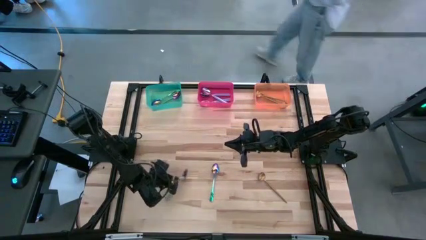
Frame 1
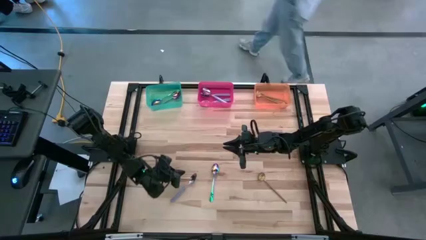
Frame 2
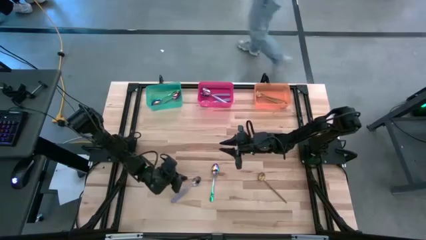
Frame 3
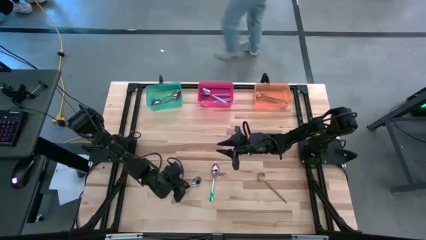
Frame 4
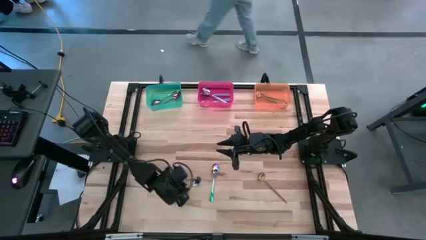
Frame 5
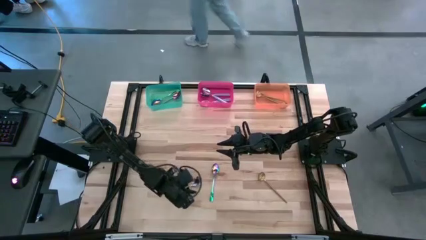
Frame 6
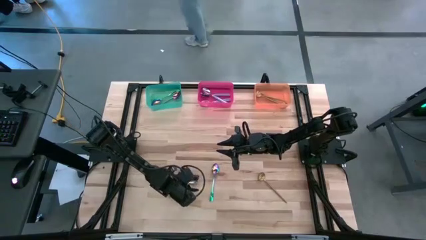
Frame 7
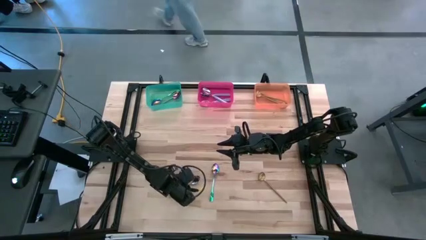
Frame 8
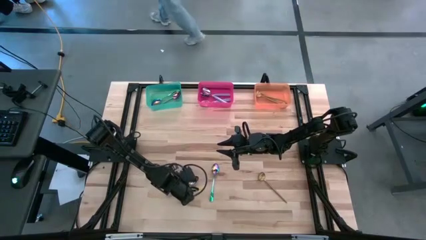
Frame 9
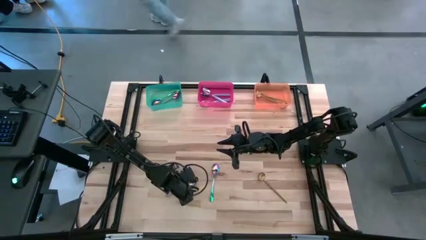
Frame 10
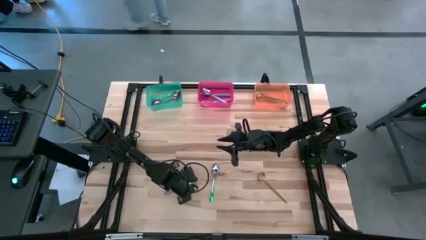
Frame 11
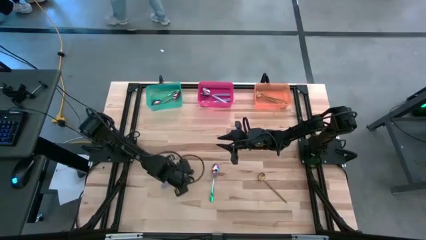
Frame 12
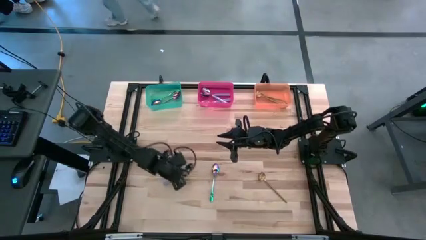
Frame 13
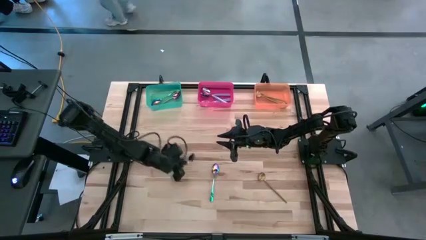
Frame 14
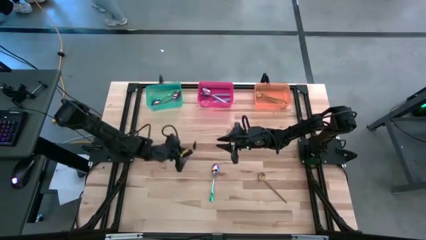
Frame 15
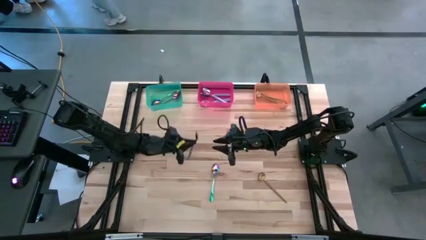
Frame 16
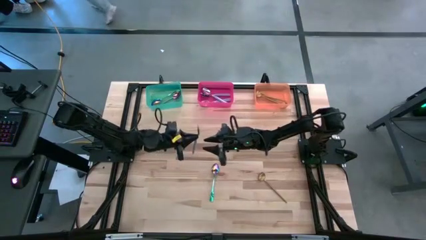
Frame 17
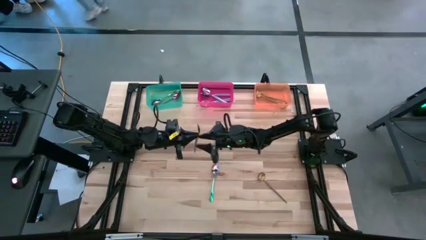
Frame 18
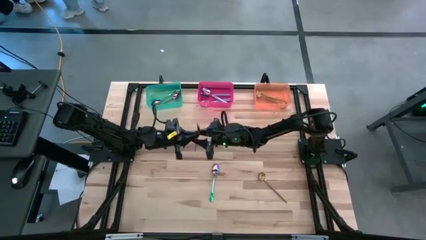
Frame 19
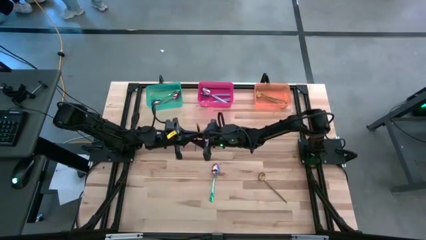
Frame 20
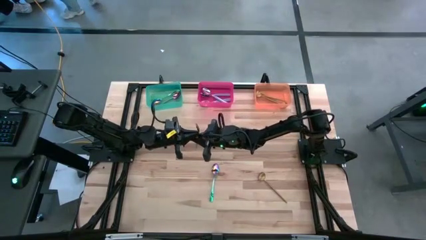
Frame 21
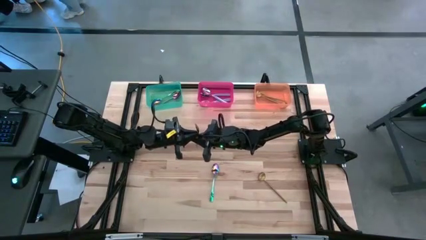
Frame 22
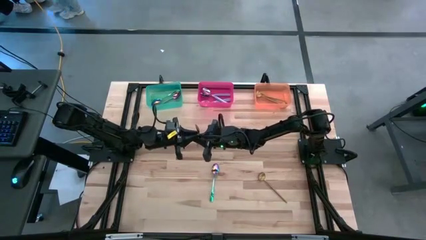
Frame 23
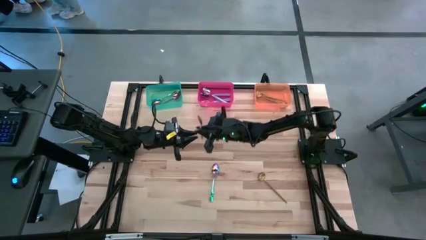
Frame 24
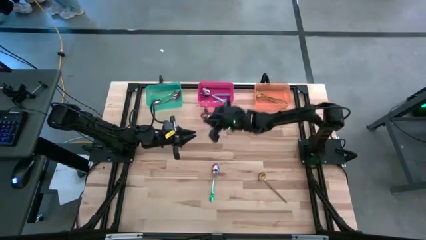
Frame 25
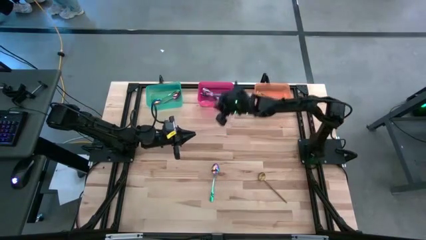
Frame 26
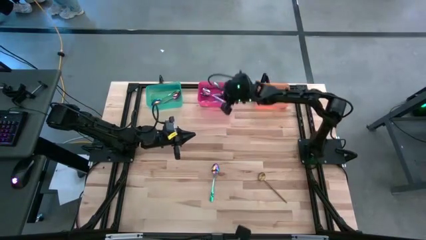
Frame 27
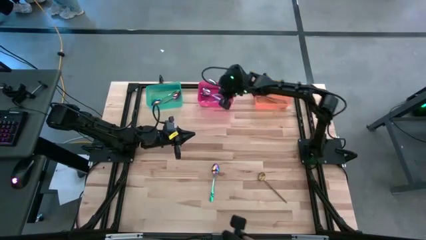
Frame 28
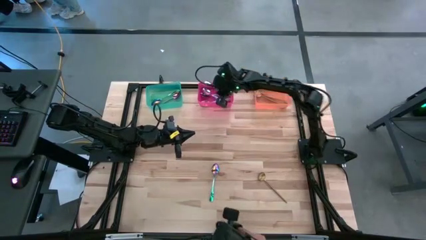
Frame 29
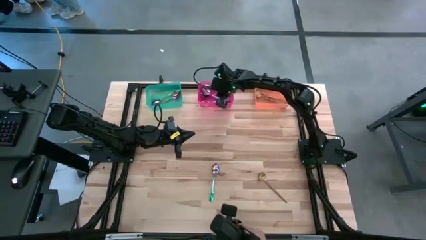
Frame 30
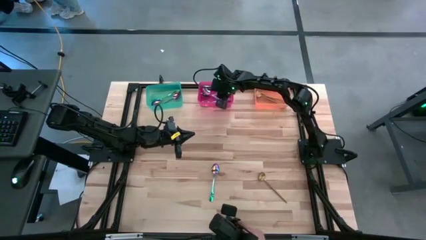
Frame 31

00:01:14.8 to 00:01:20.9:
Task: Sort silverware by color (type)
Put the purple spoon into the red bin

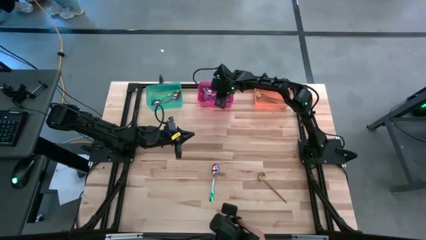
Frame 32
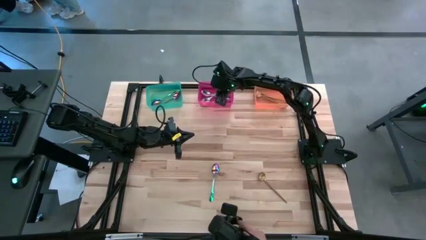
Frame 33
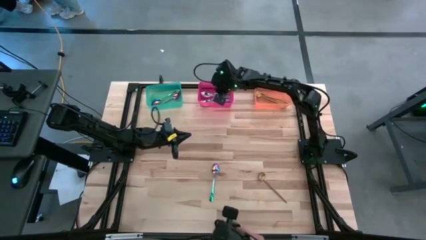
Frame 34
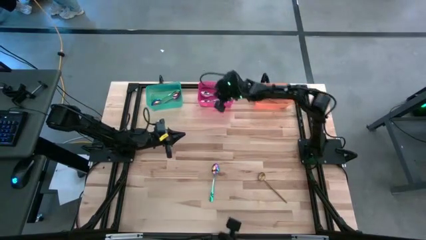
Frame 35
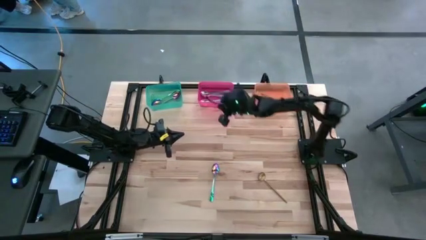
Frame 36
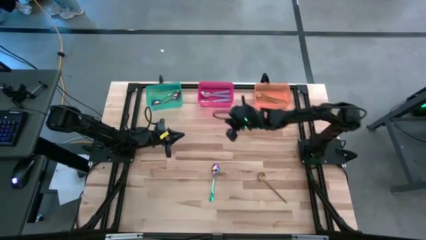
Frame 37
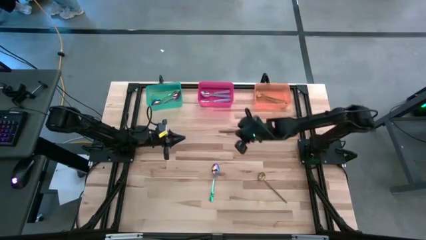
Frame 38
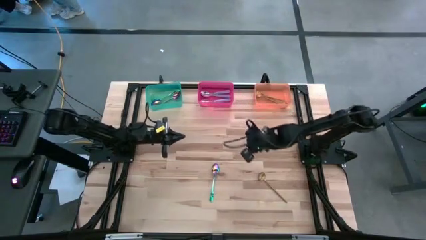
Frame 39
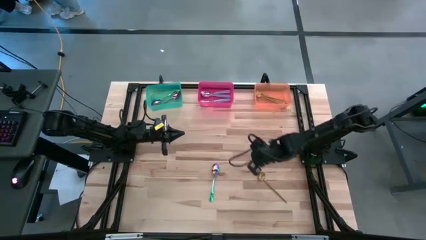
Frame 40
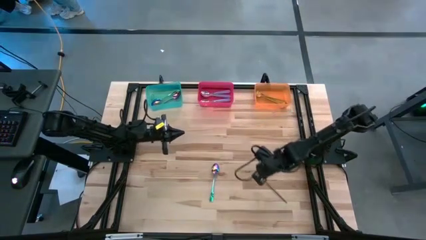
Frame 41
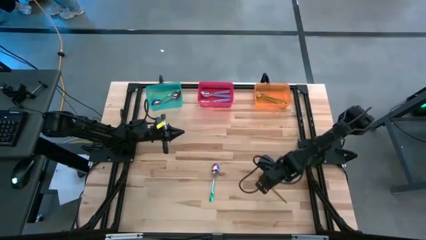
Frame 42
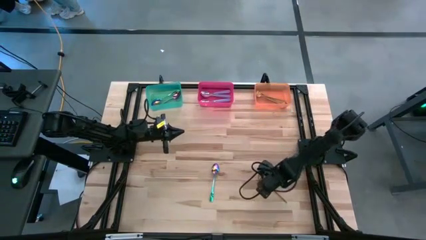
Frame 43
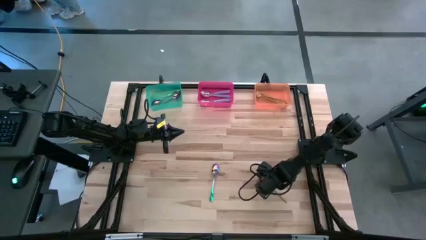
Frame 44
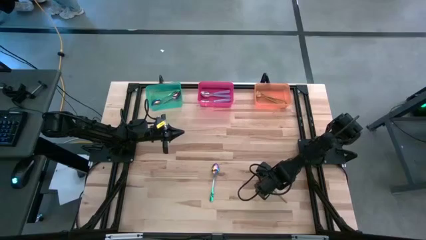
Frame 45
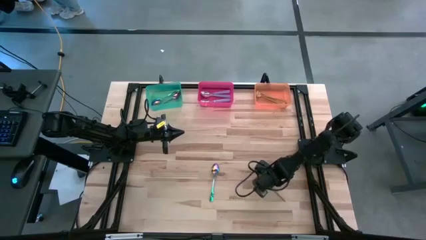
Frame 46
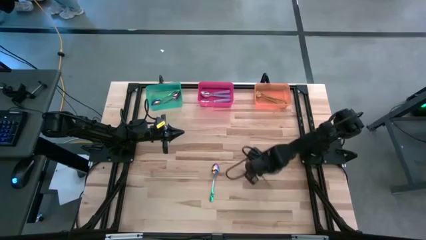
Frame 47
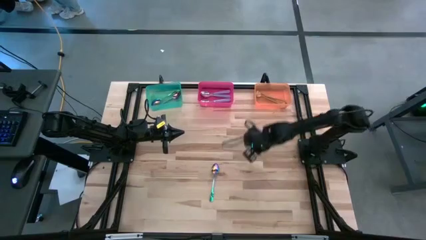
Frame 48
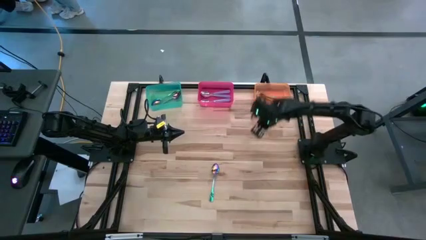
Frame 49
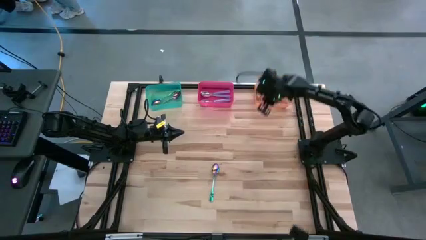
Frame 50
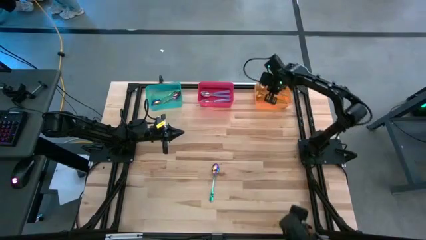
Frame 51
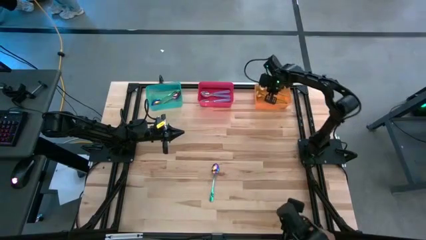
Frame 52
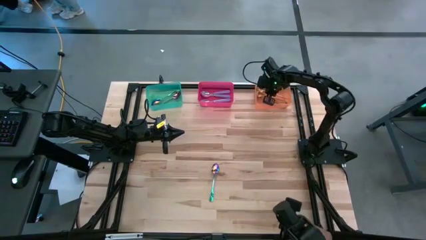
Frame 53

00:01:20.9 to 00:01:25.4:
Put the gold spoon into the orange bin

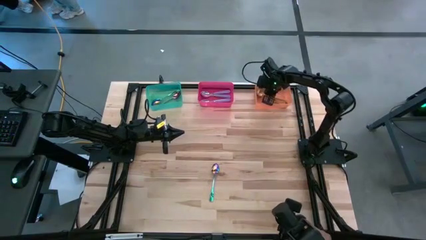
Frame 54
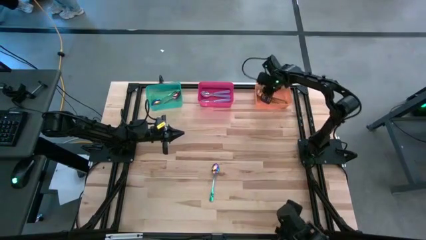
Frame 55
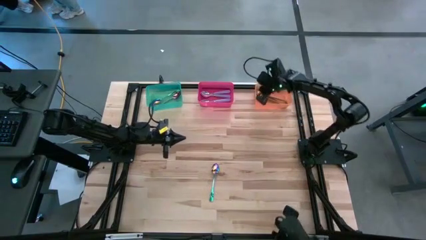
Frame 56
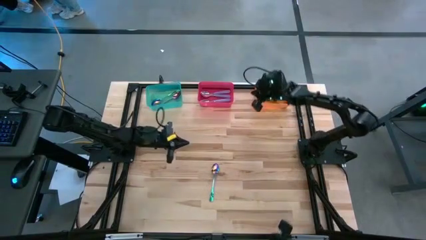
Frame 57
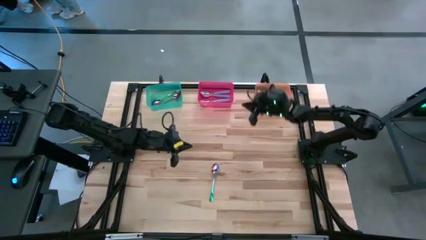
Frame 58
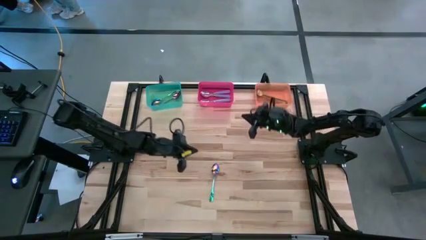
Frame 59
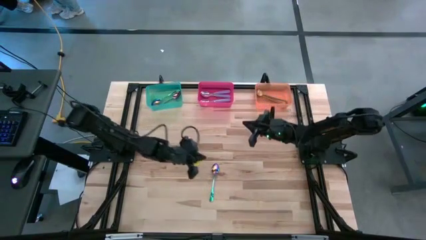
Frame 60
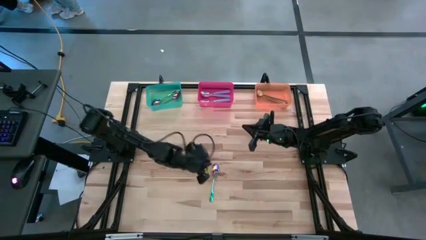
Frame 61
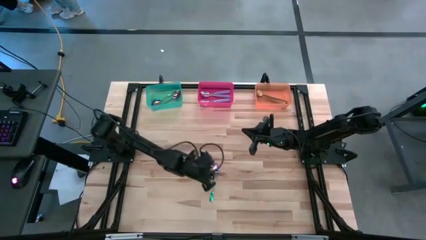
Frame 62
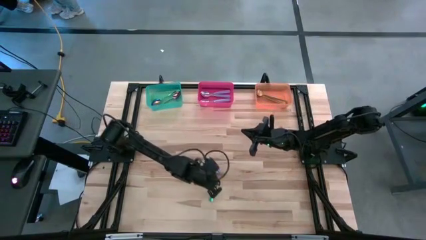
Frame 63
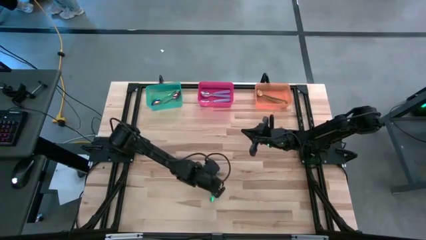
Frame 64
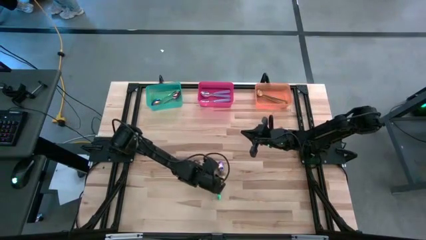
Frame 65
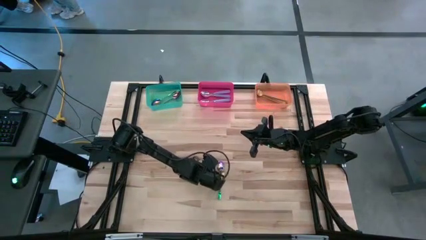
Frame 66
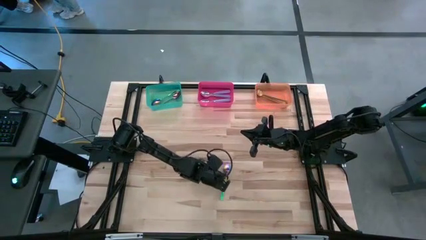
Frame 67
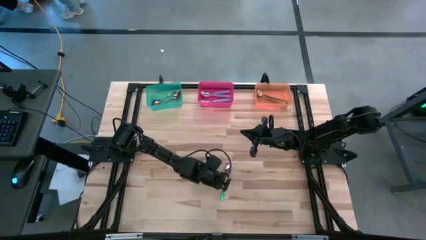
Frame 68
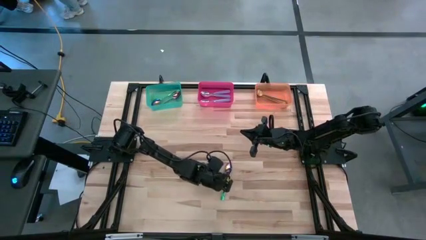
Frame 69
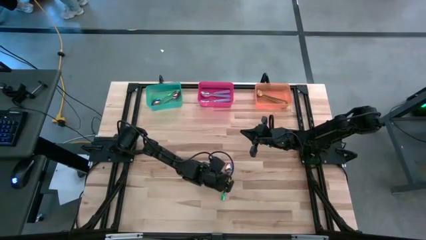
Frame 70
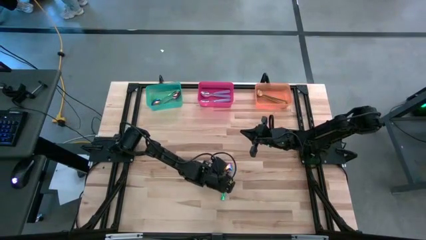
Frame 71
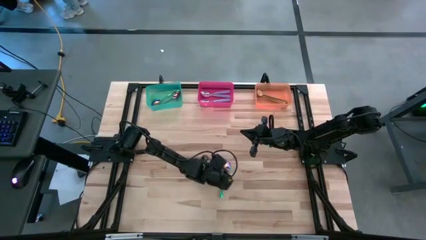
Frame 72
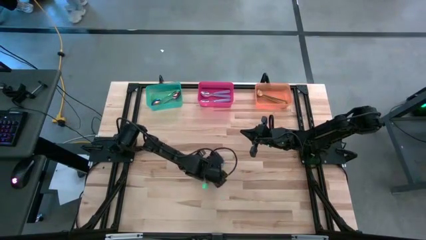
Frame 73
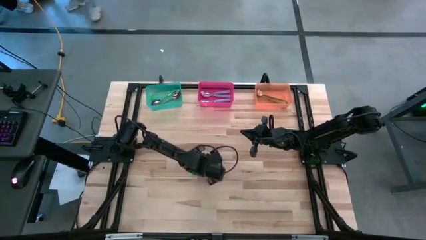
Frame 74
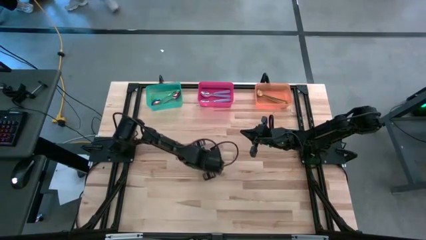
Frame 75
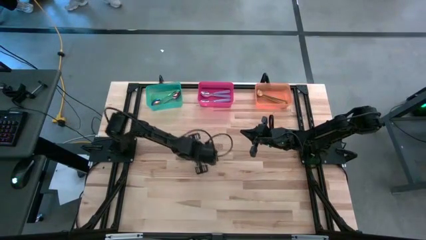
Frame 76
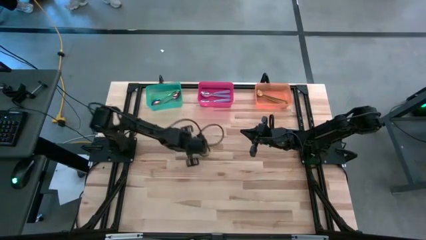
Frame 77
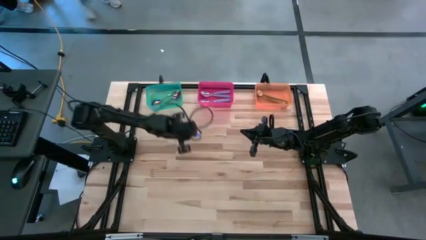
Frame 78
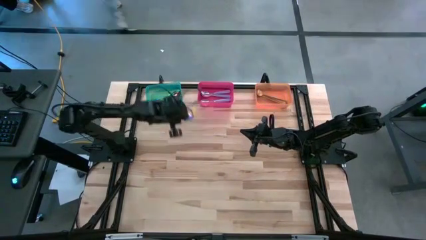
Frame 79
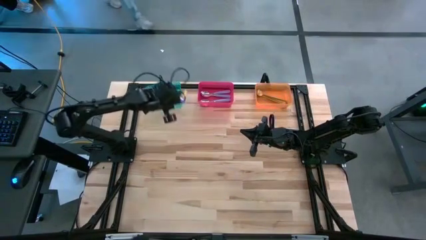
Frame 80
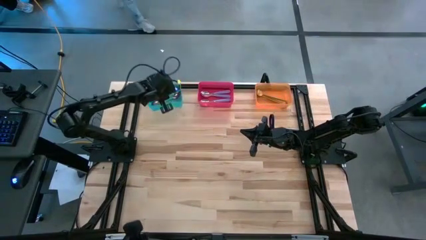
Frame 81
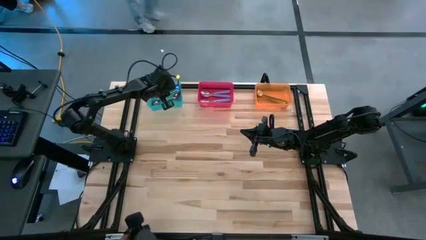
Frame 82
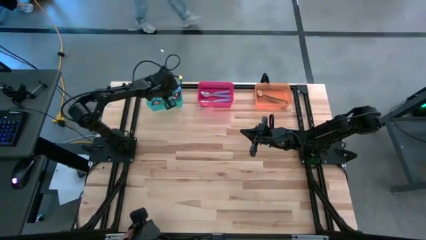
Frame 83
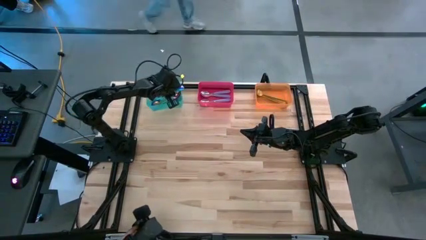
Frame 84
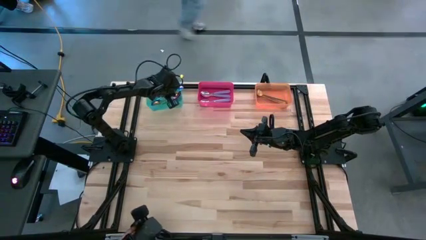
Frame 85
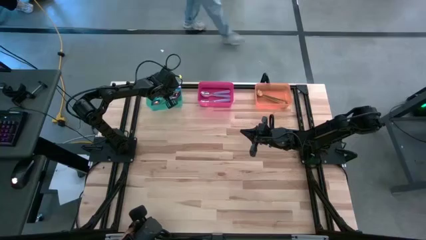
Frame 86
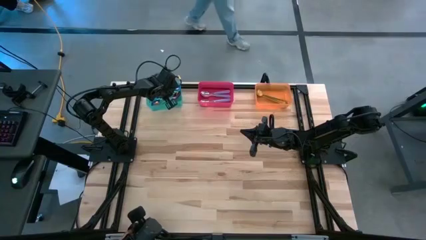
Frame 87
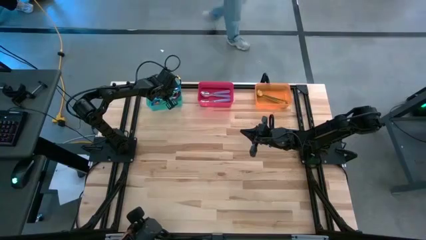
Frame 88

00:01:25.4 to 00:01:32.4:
Put the blue spoon into the green bin
